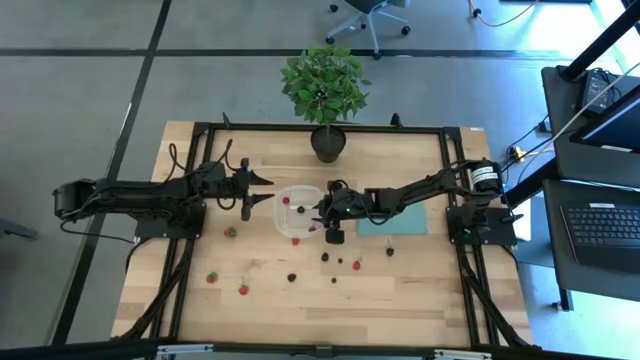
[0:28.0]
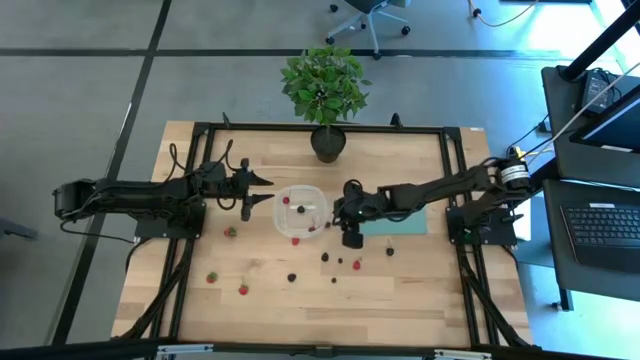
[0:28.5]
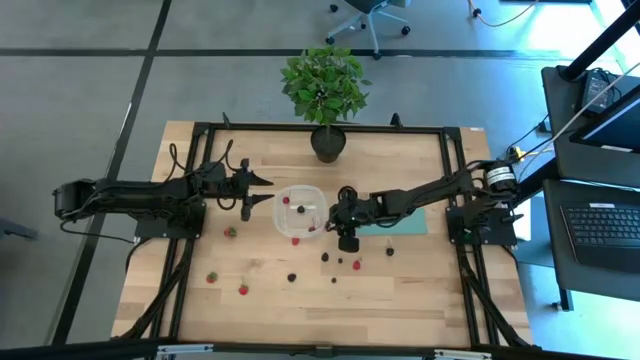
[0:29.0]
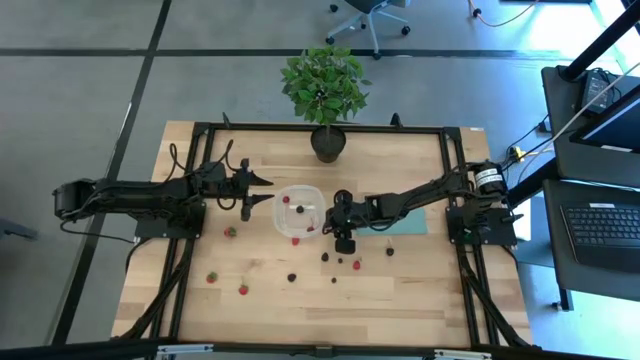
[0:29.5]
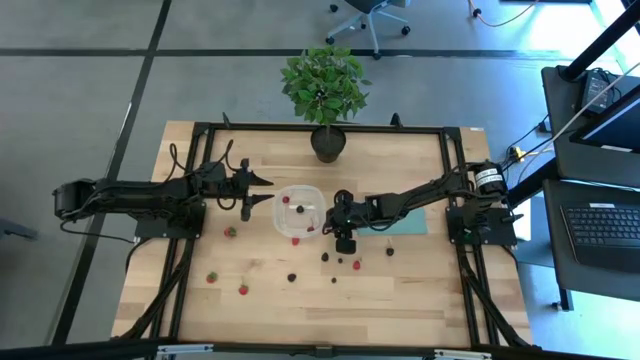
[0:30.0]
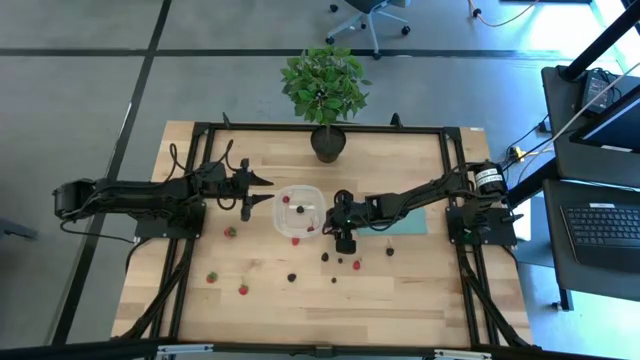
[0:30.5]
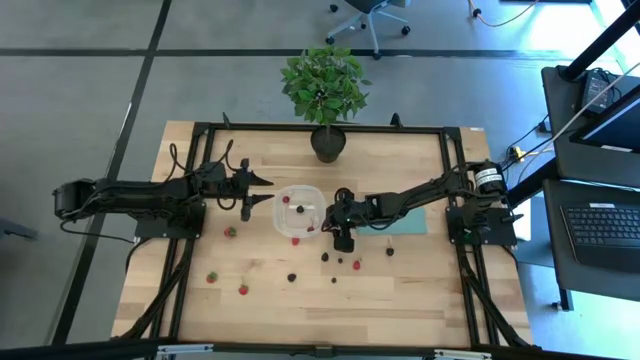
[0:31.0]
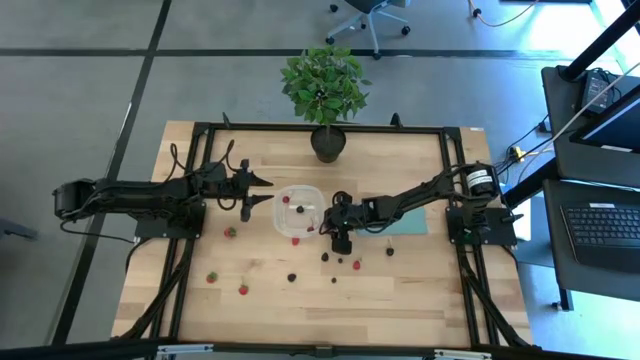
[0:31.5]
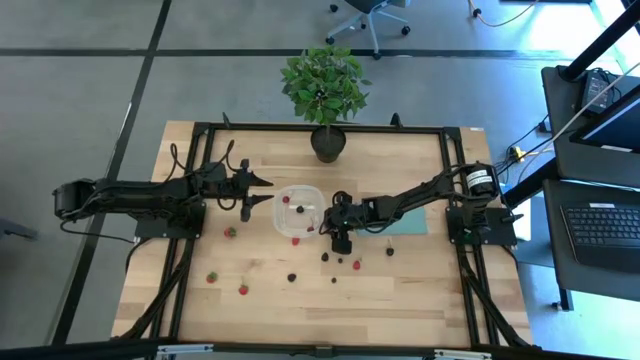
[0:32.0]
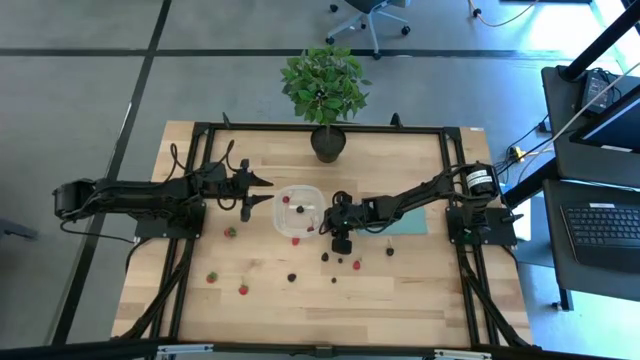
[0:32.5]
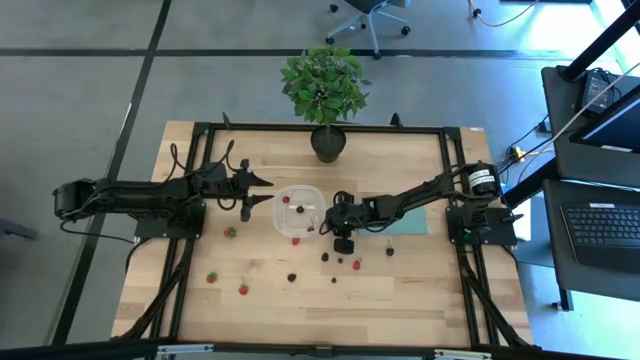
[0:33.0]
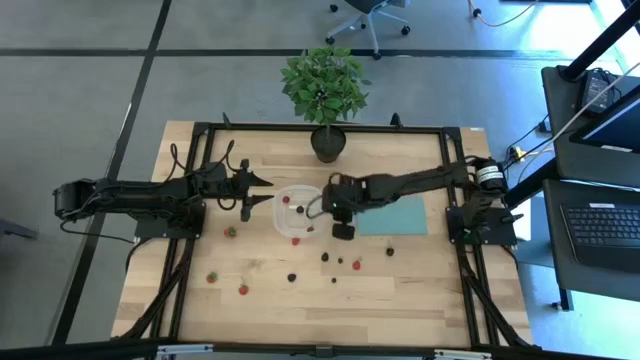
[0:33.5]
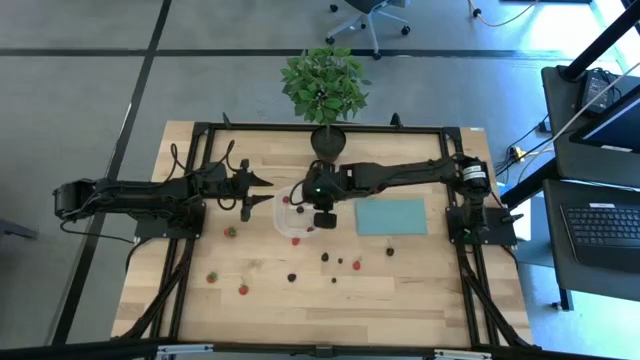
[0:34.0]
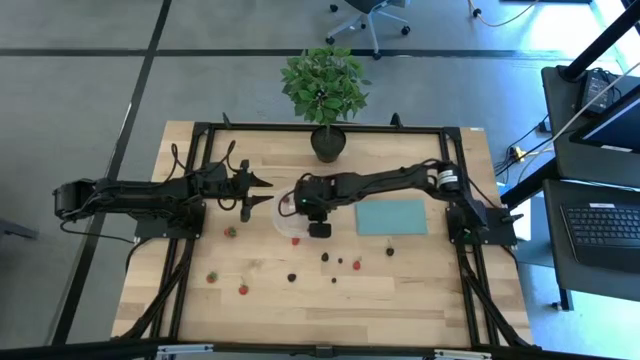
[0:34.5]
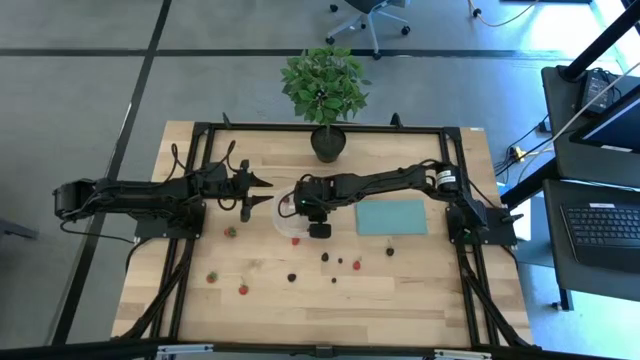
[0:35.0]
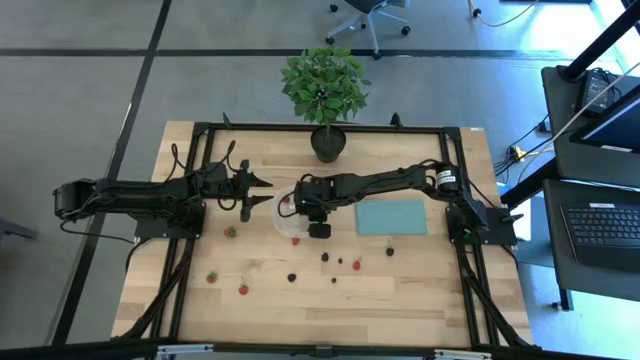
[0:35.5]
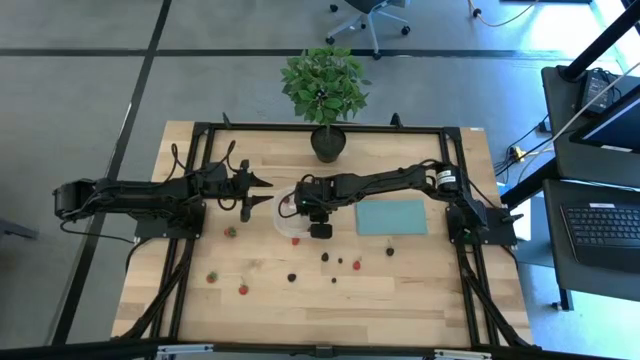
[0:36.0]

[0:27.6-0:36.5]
Task: Pick and placing Produce into tupperware
Put the red cherry into the container

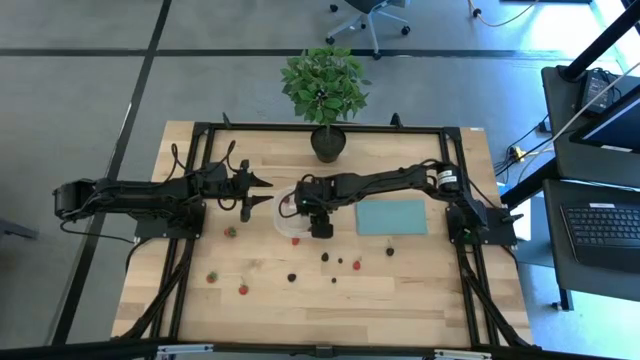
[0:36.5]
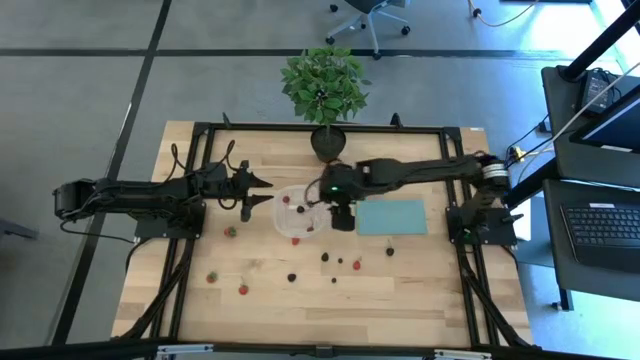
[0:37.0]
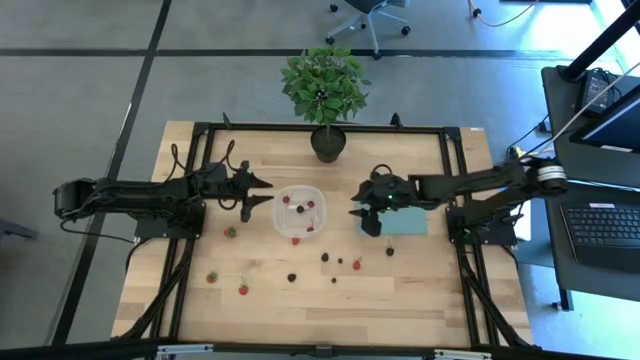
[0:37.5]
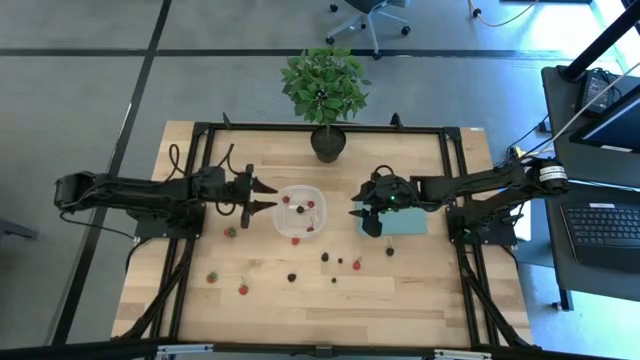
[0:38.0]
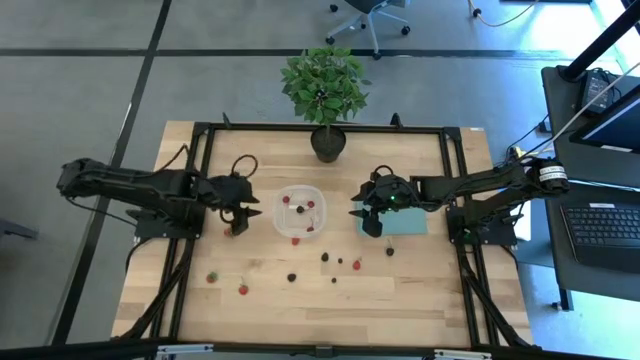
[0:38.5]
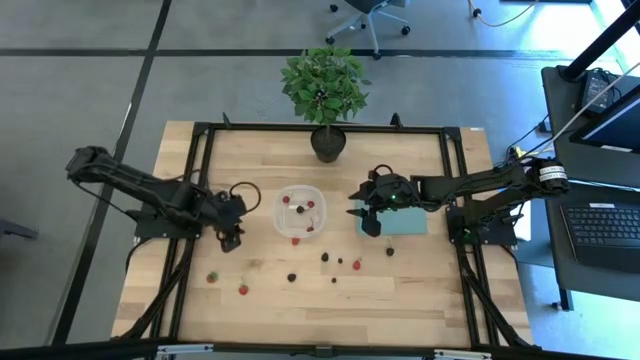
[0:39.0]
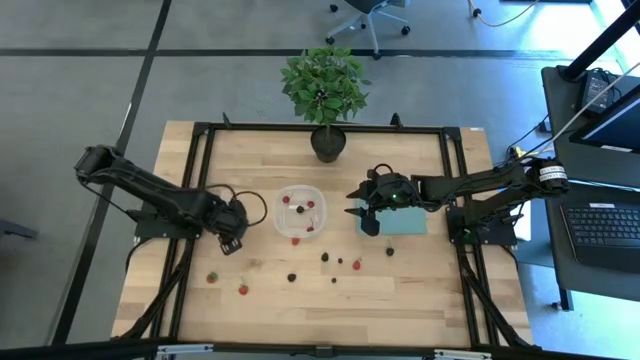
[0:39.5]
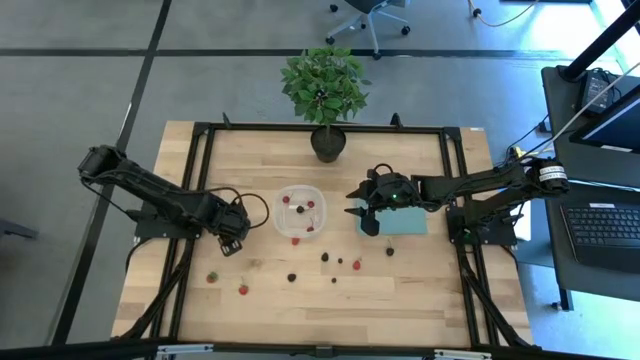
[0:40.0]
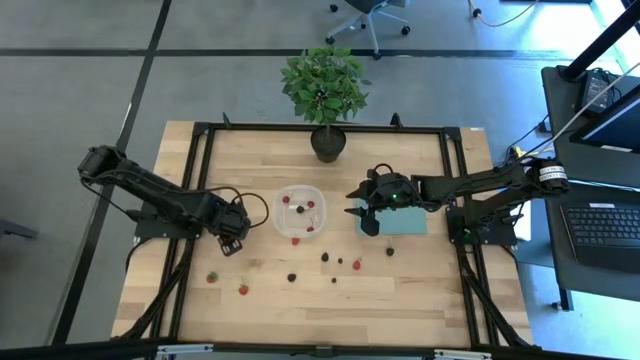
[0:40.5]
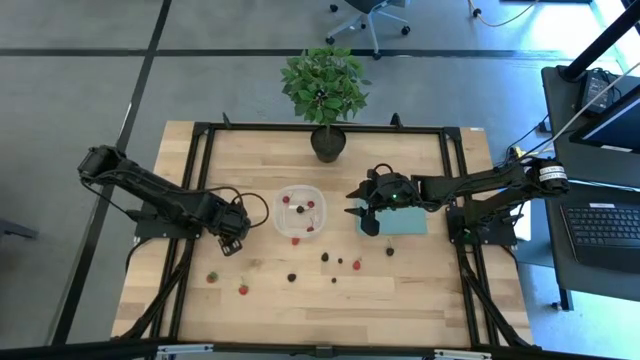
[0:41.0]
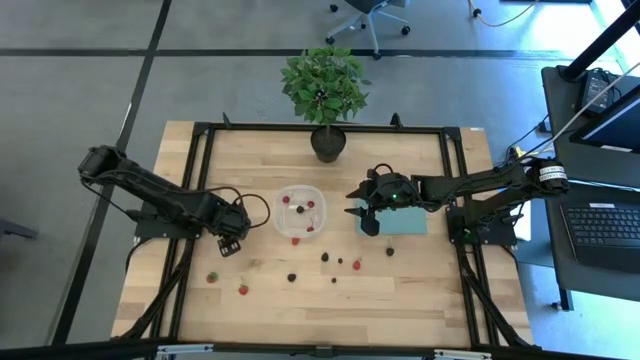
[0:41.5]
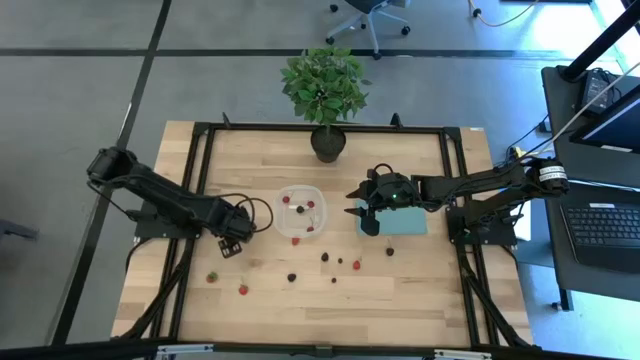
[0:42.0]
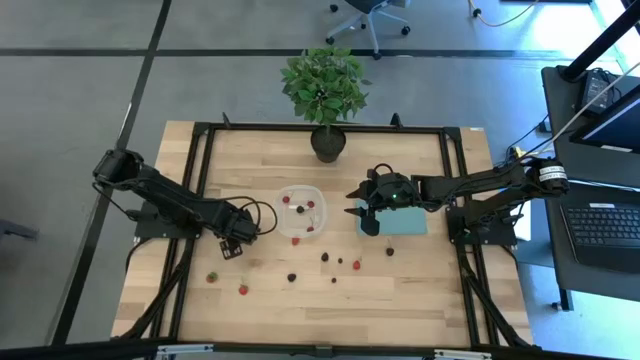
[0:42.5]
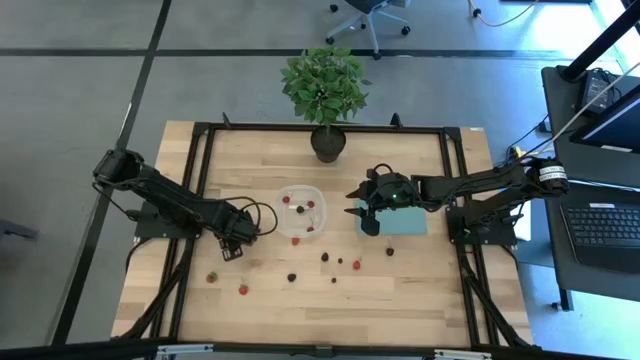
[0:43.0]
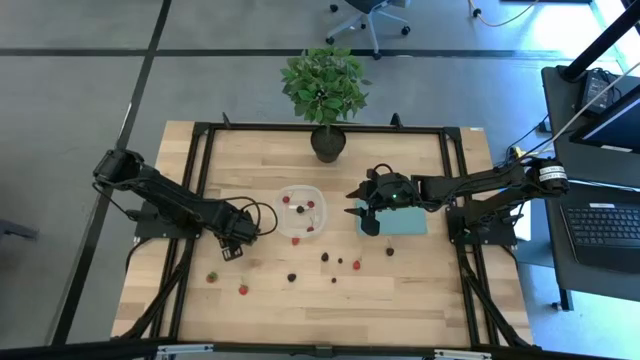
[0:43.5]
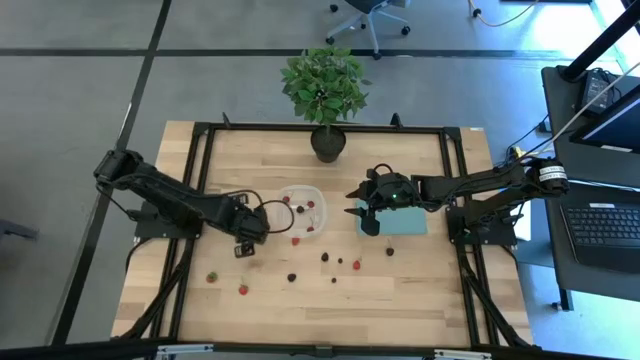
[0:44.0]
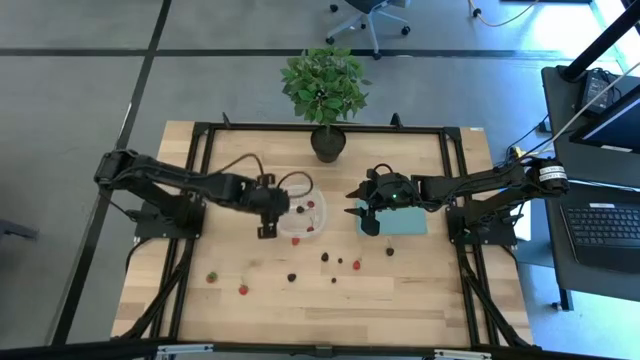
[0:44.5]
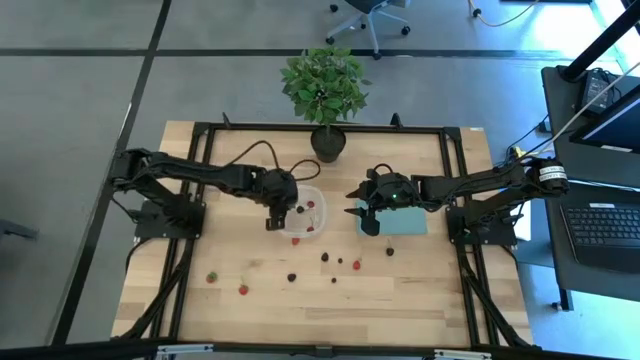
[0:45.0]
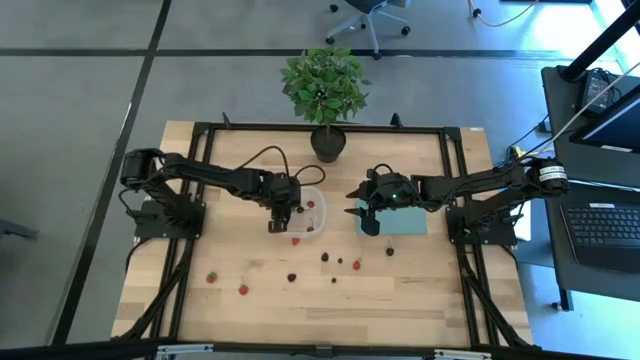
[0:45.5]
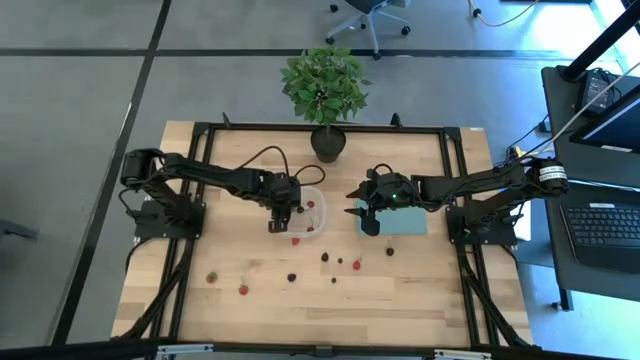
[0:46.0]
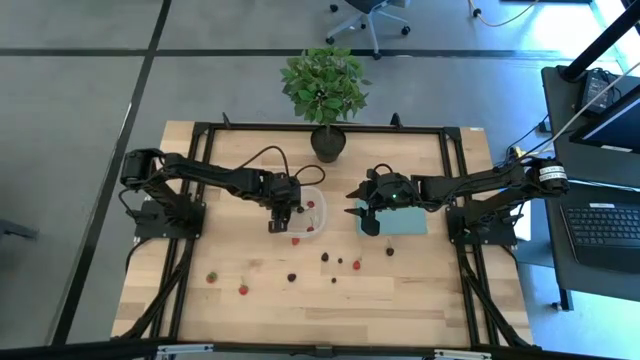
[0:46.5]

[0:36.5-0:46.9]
Put the top strawberry into the container

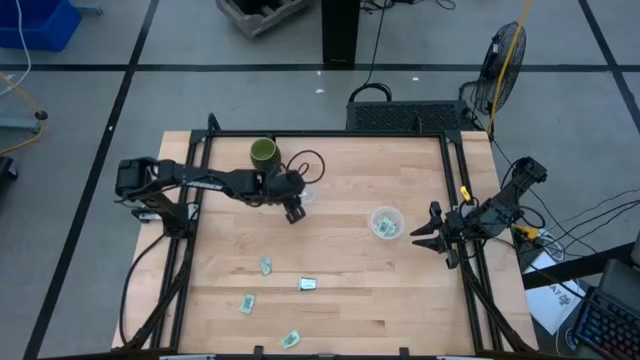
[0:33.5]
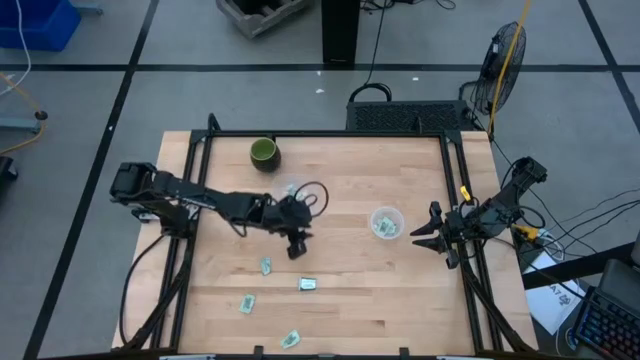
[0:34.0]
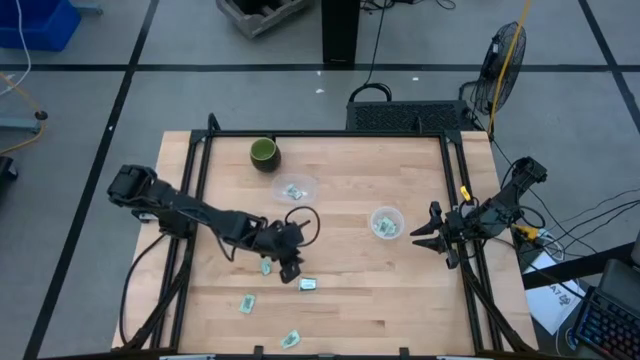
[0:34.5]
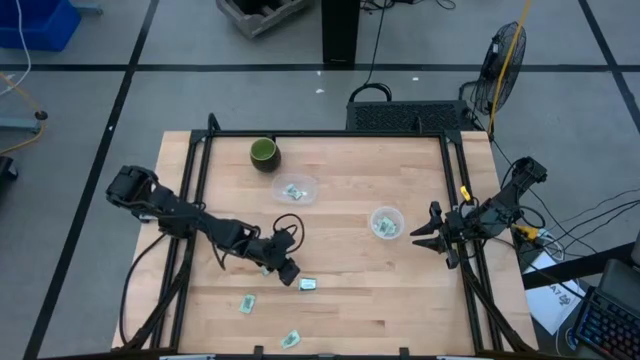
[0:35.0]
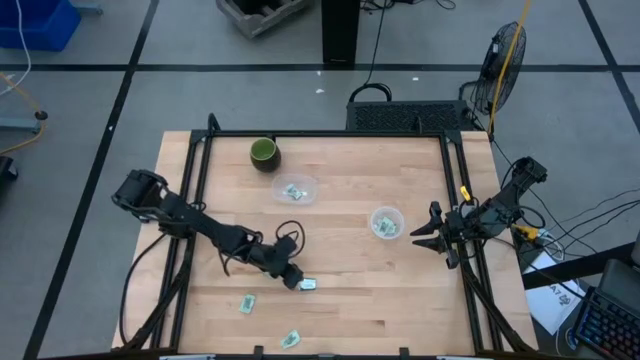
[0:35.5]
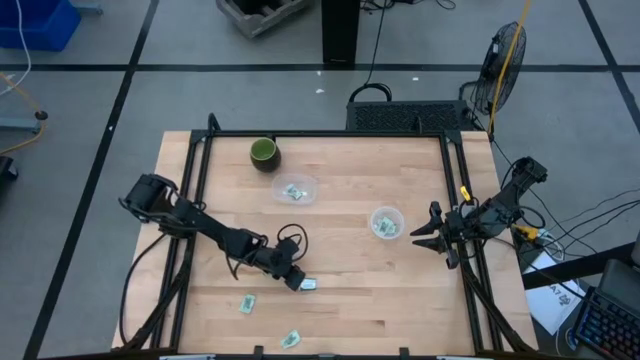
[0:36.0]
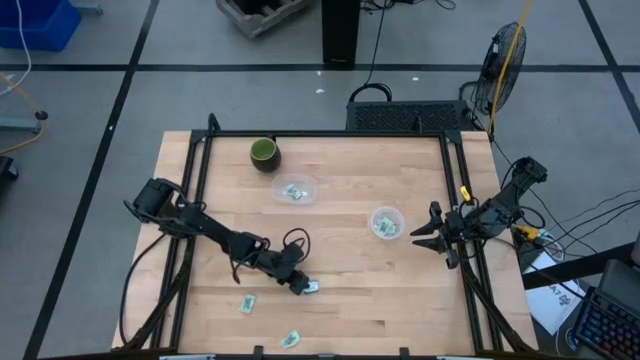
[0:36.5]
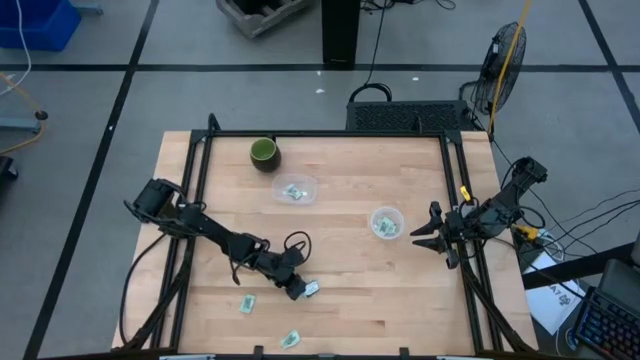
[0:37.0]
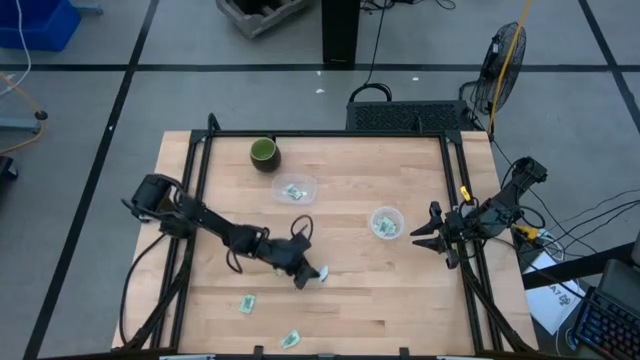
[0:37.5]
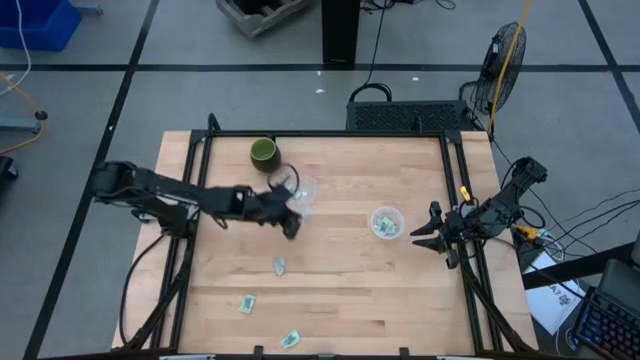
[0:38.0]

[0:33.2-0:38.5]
Task: Pick and place items into bin
Put the green stevia packet into the left transparent bin
